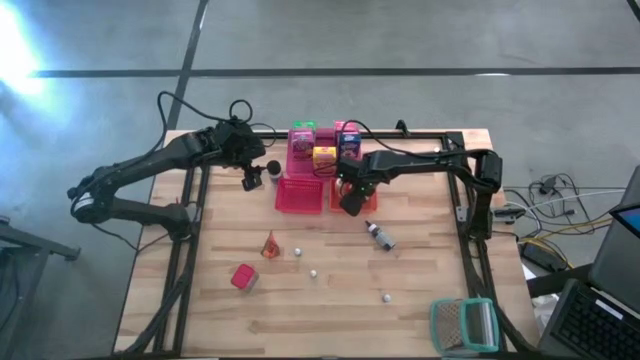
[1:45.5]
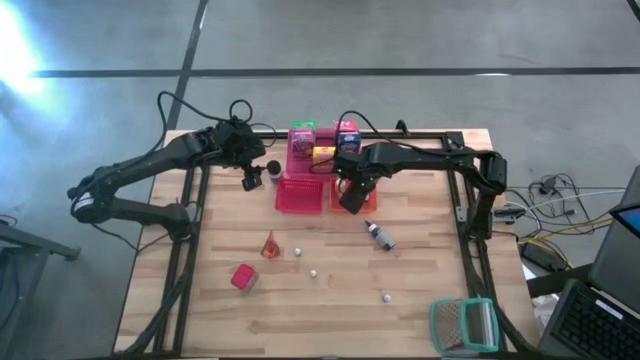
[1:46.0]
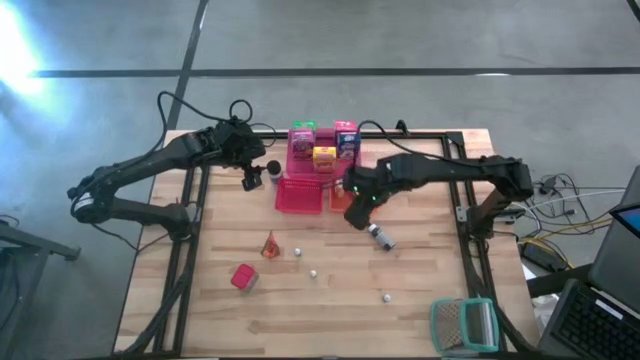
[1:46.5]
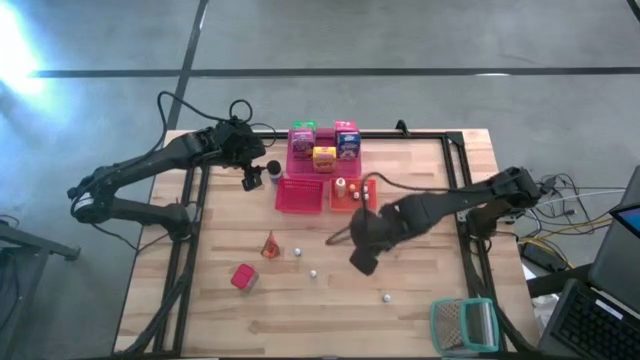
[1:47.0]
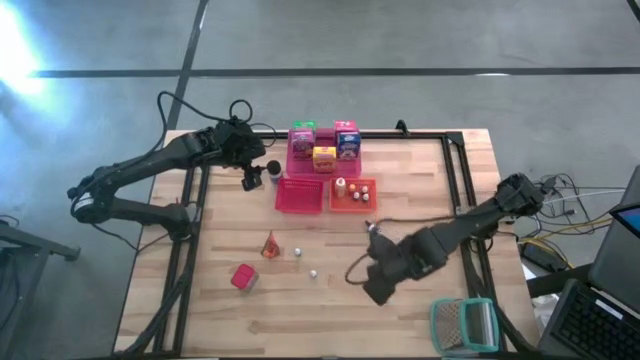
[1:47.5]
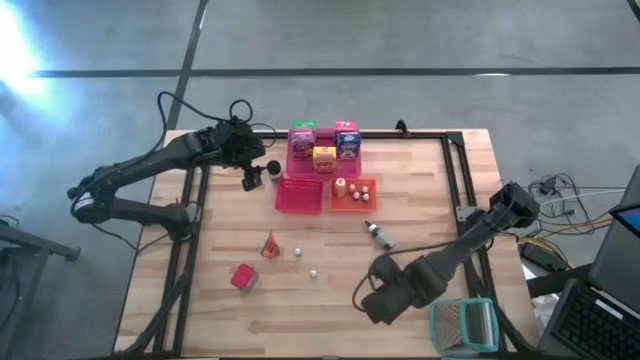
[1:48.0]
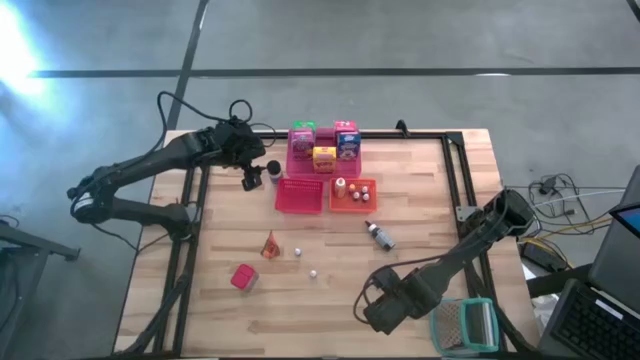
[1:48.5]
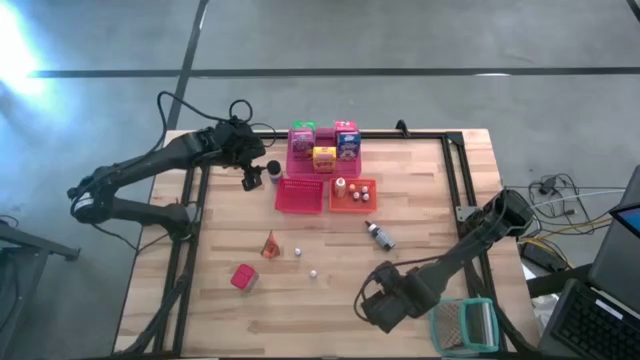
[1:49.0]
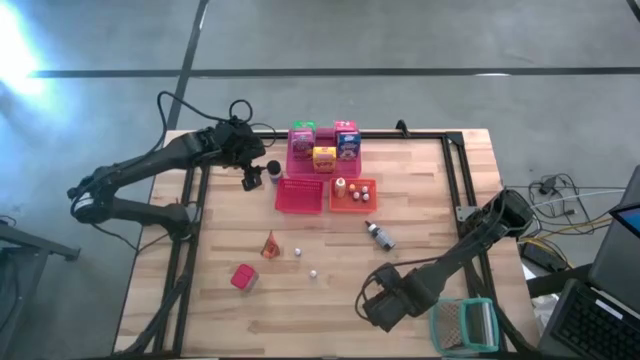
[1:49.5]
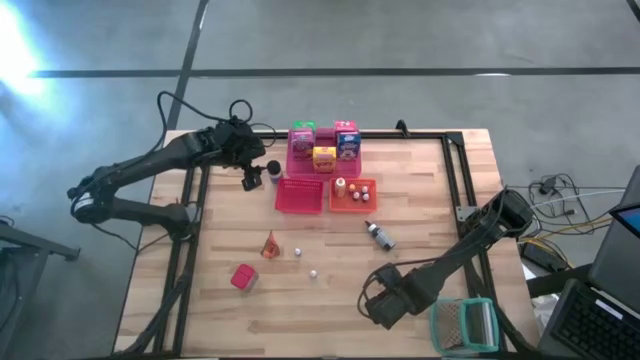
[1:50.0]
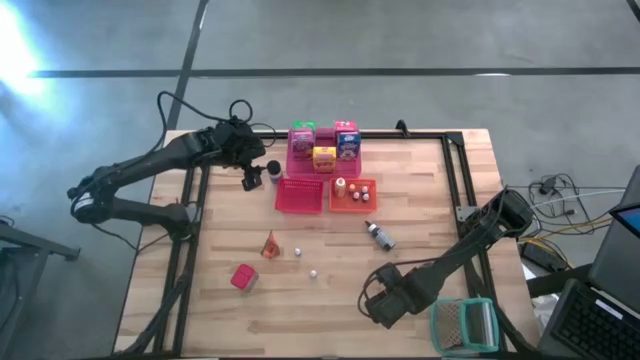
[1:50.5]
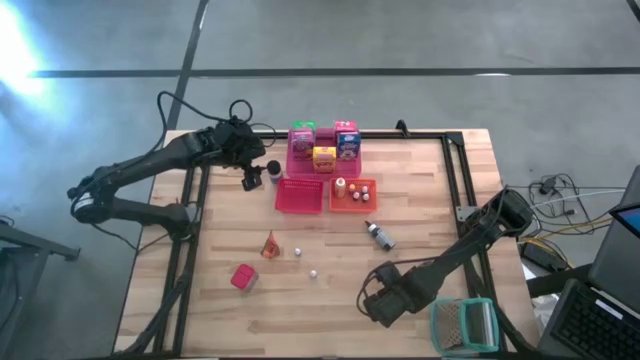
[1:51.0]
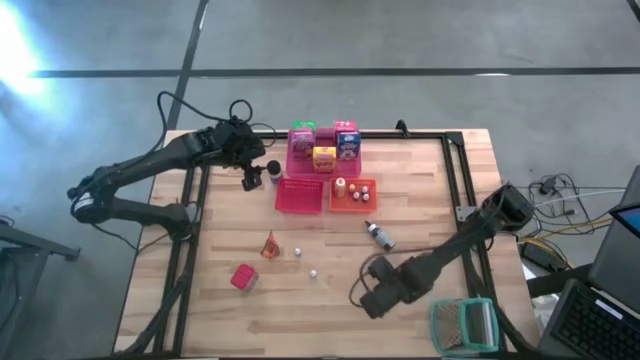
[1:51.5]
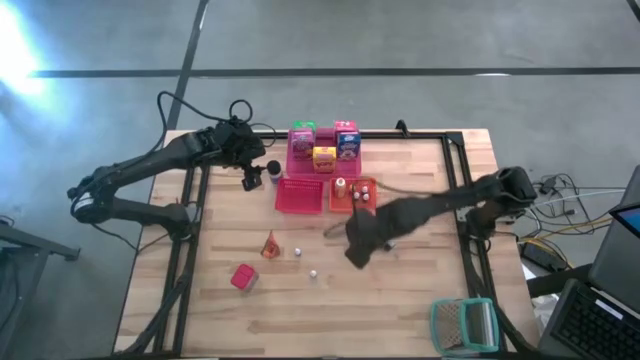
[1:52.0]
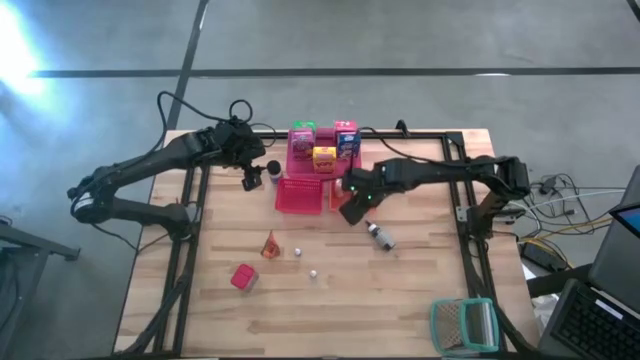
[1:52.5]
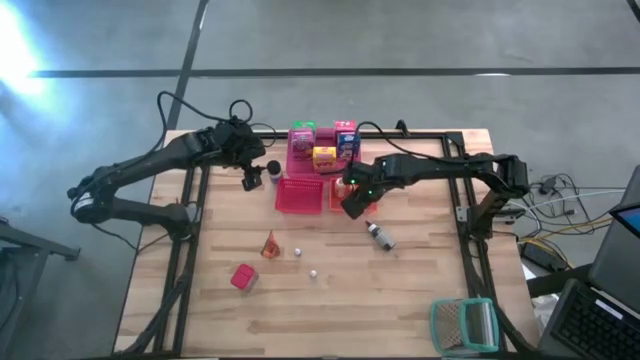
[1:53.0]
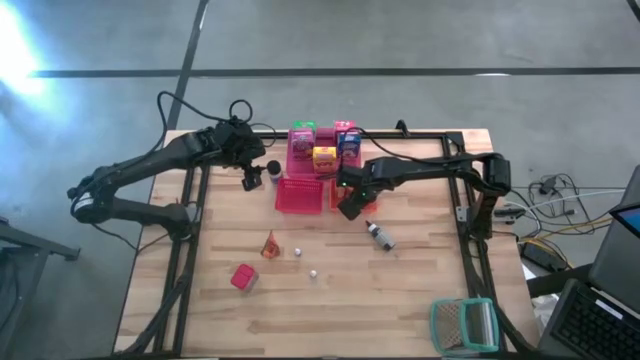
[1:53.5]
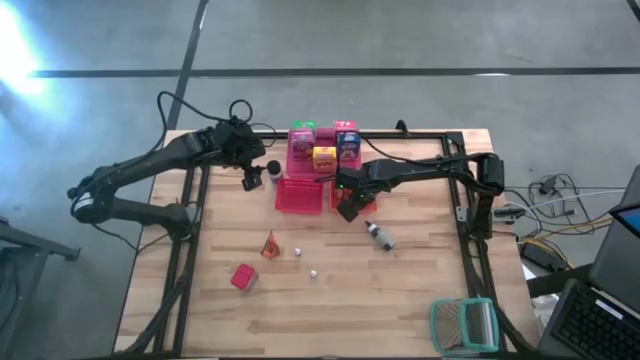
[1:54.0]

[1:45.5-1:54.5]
Task: Pick & Place Kitchen Items
Put the small black food coloring bottle into the orange bin

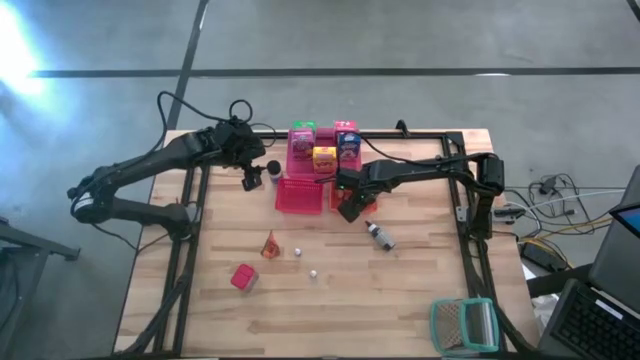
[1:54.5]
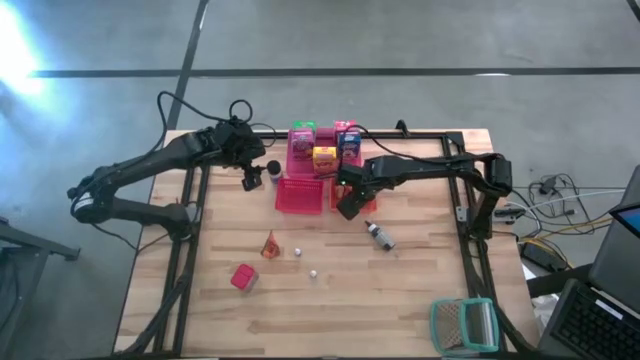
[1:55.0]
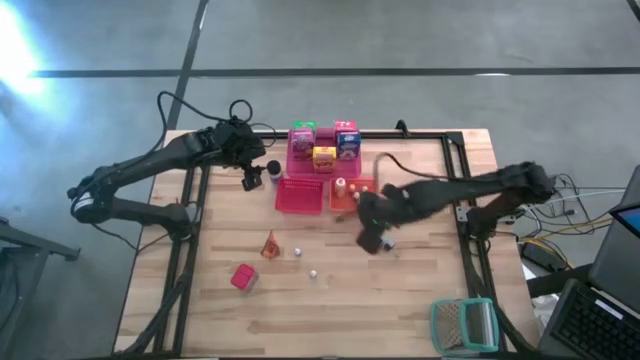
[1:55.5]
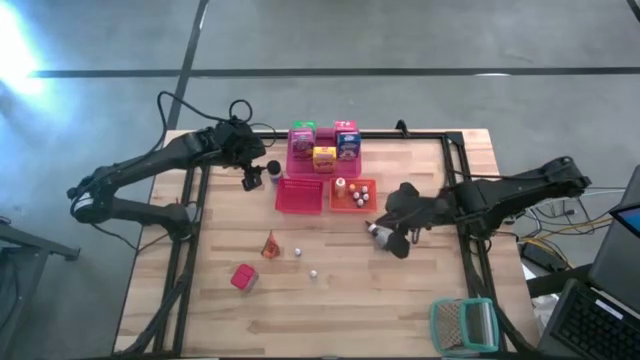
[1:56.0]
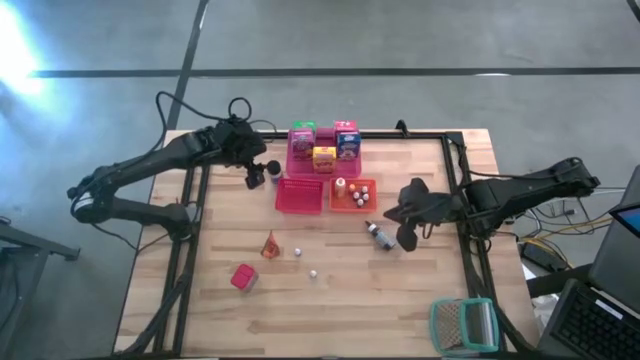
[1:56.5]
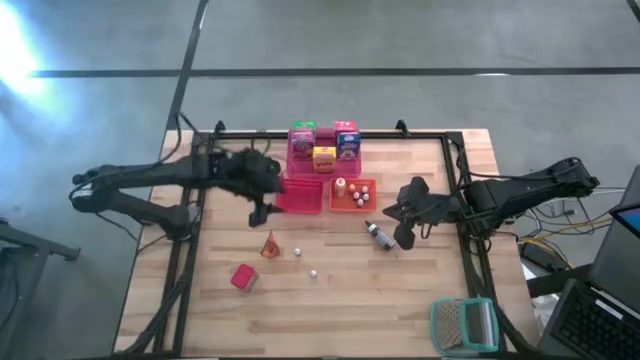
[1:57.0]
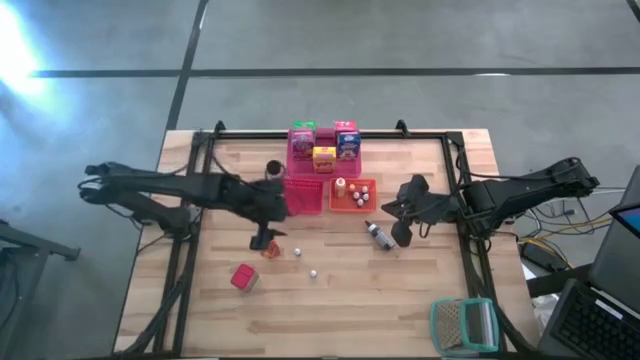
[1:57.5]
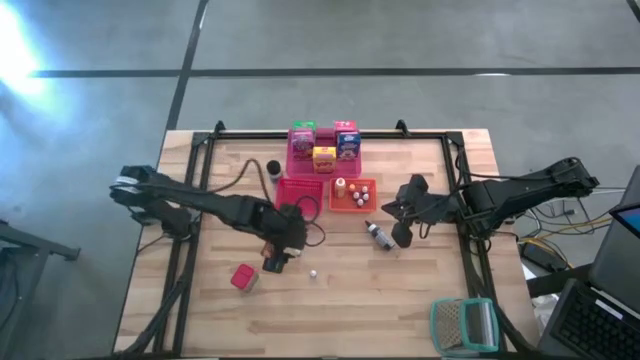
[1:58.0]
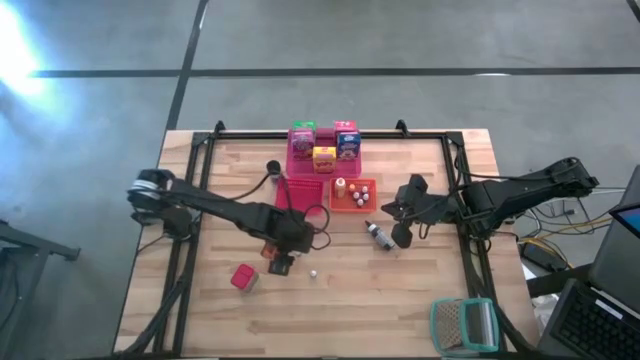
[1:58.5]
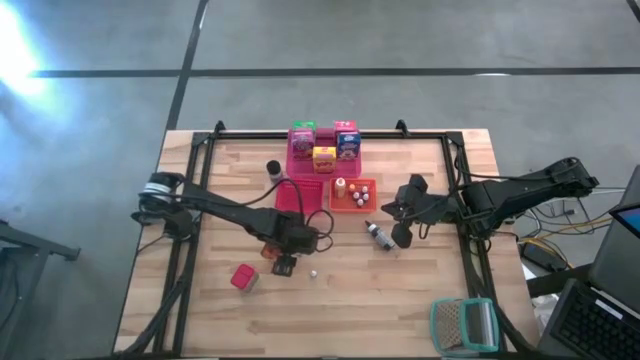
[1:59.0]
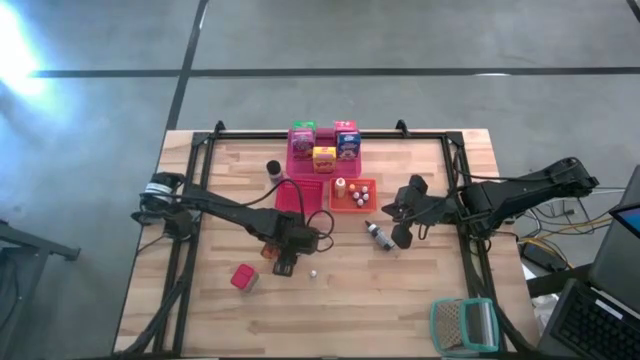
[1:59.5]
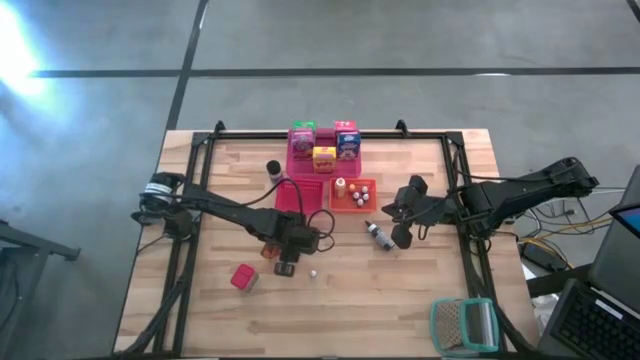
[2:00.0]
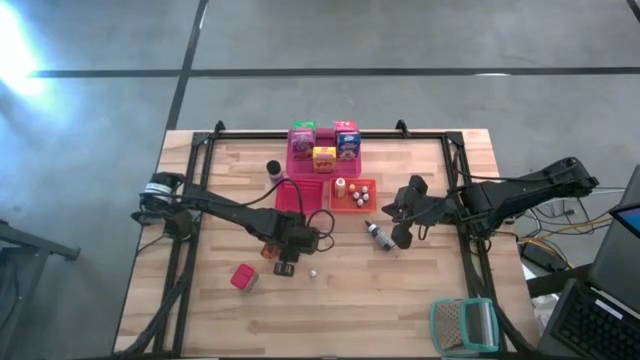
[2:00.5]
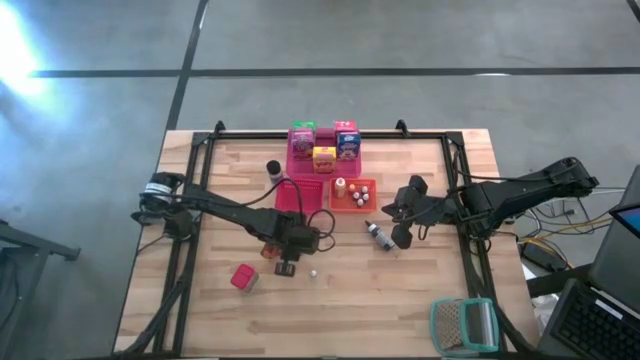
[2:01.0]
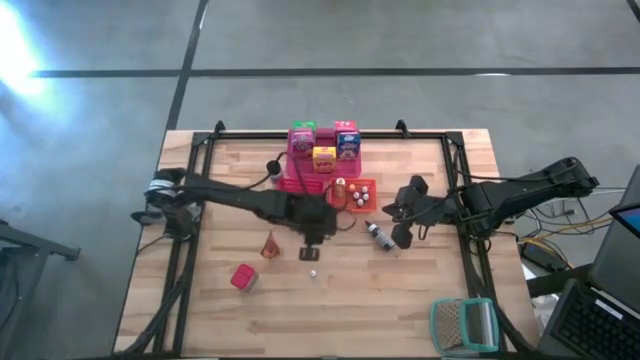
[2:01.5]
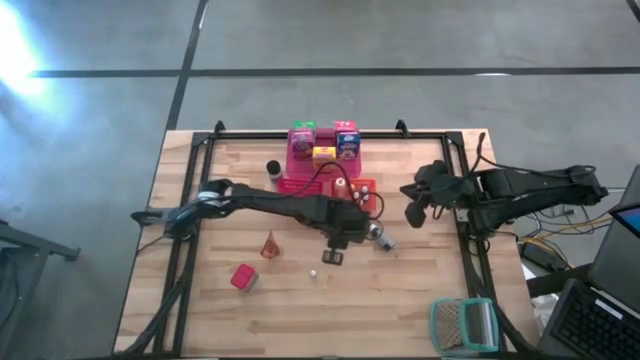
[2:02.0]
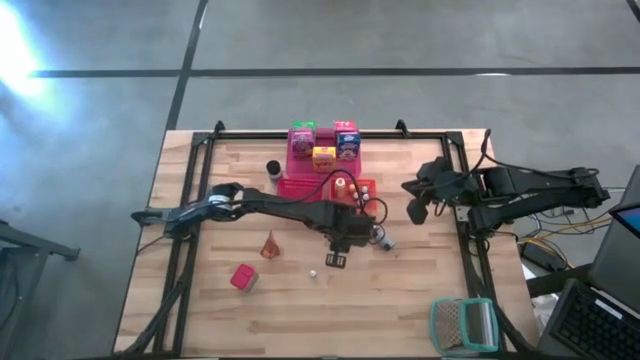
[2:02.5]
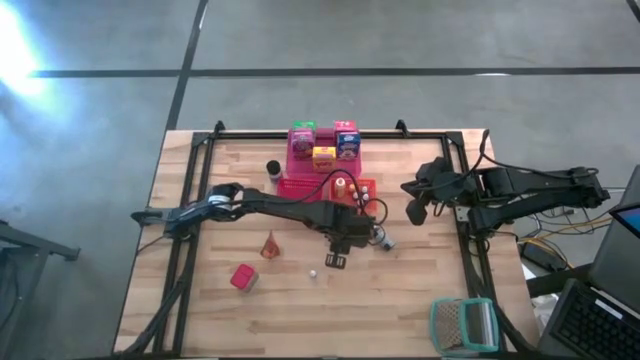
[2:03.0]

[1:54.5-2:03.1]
Move the small violet food coloring bottle to the middle right of the table

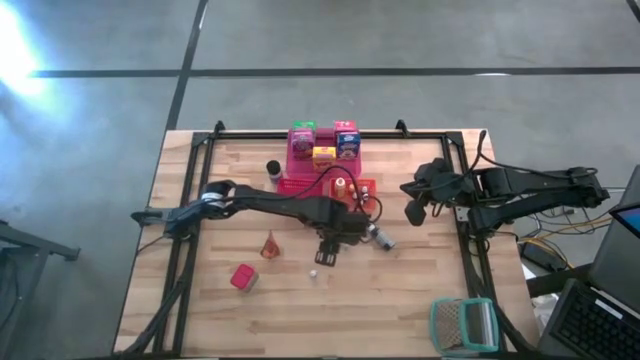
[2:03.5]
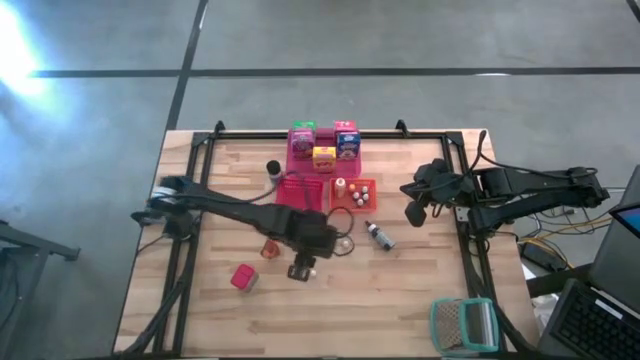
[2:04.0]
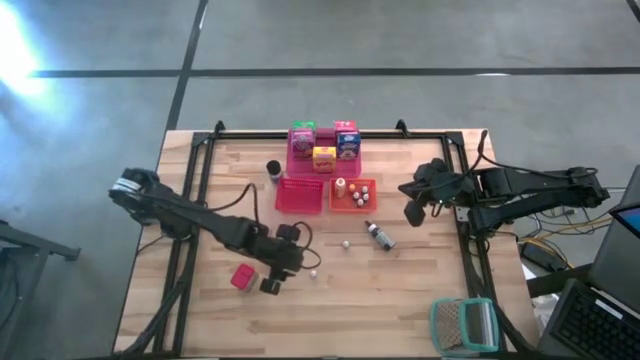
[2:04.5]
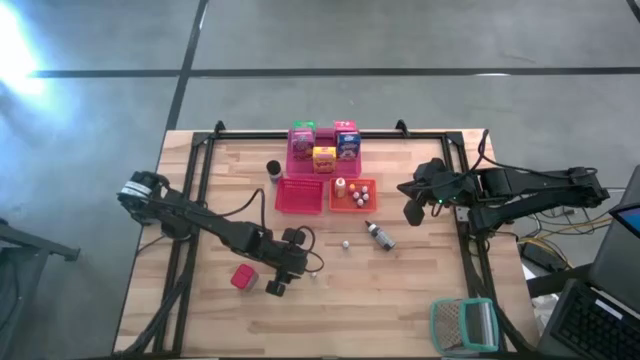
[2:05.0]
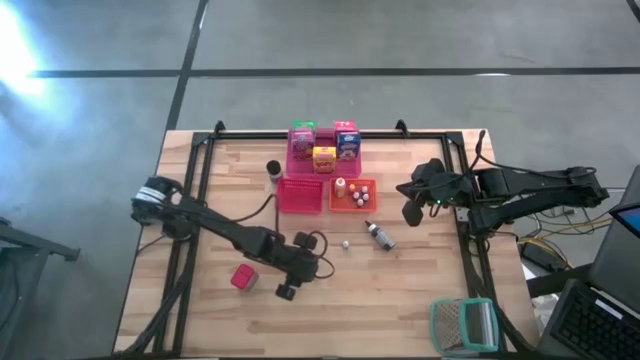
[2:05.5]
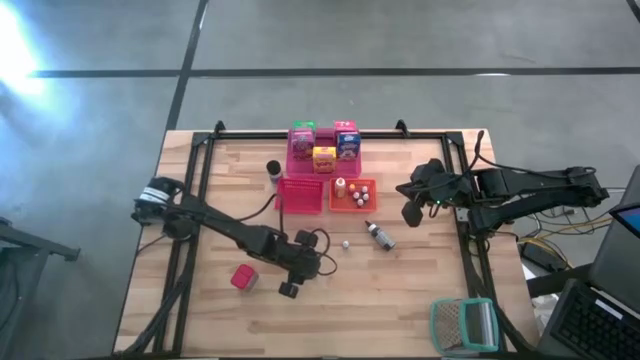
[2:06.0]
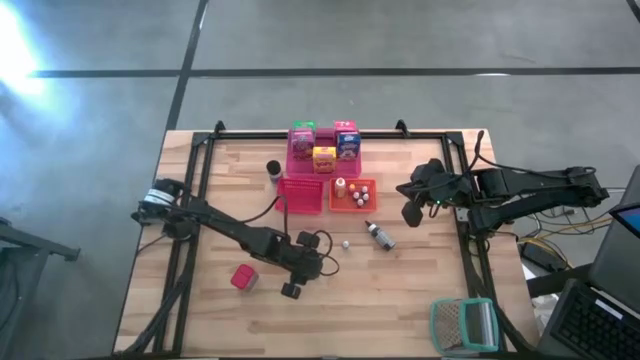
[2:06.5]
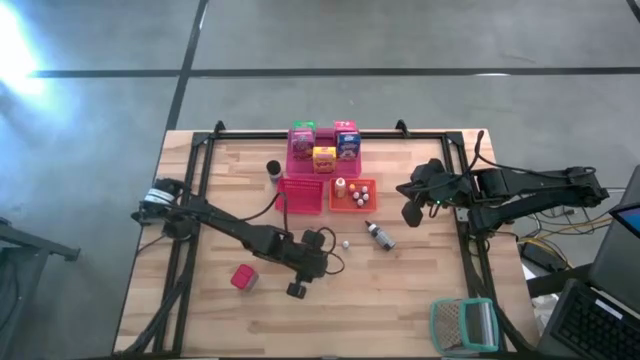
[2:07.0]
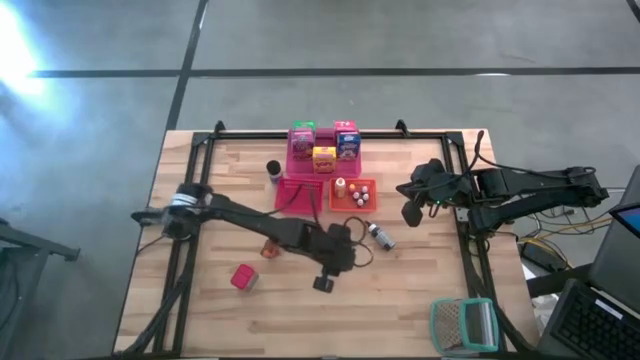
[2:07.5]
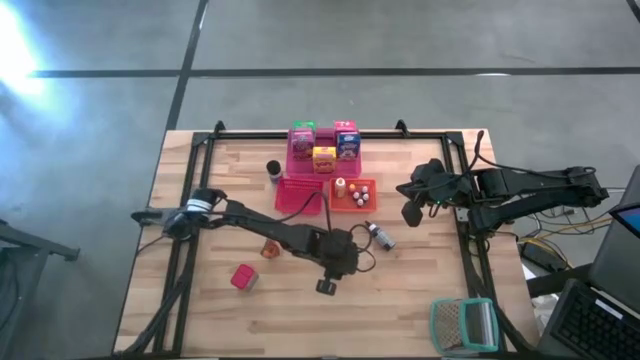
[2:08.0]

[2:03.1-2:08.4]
Move the small red food coloring bottle to the middle right of the table
